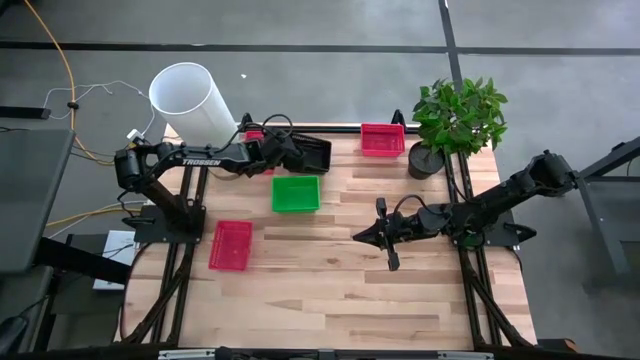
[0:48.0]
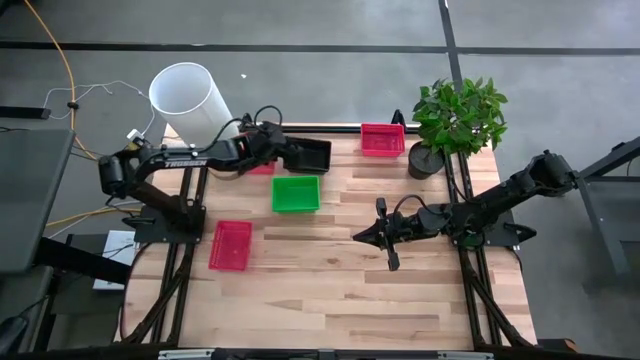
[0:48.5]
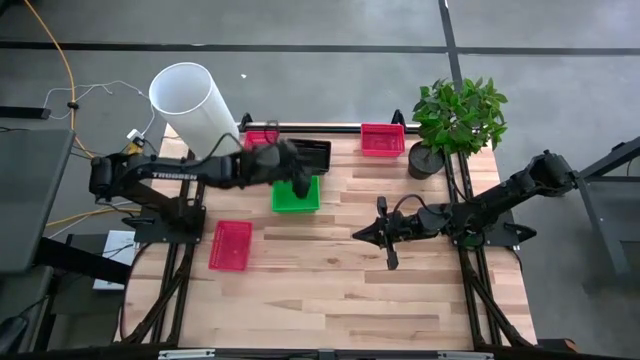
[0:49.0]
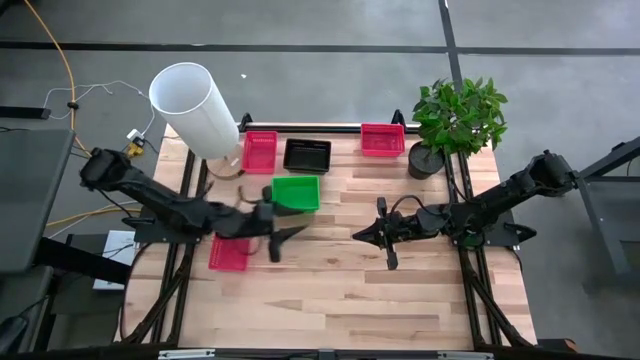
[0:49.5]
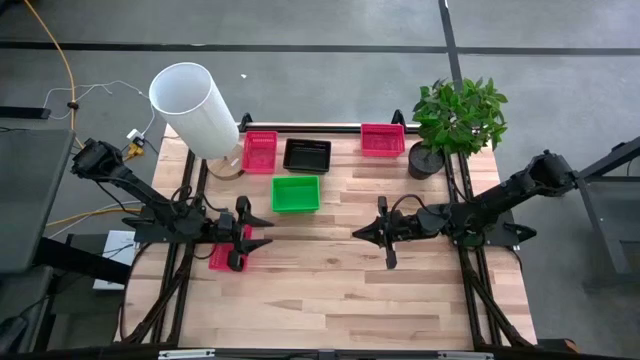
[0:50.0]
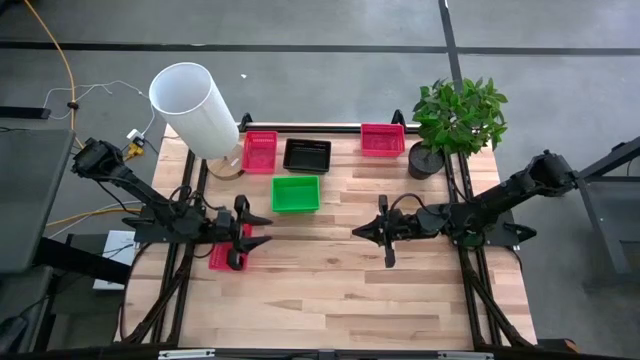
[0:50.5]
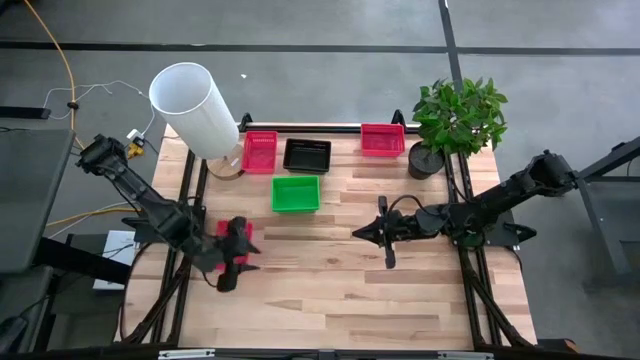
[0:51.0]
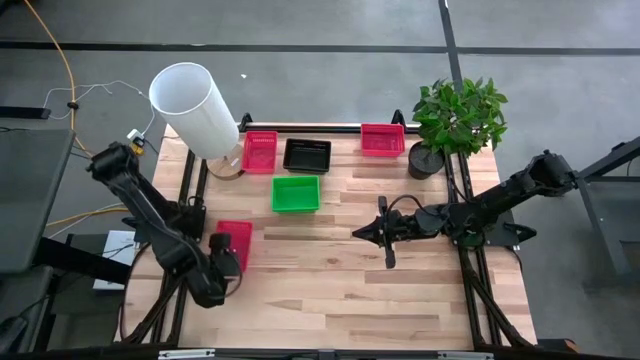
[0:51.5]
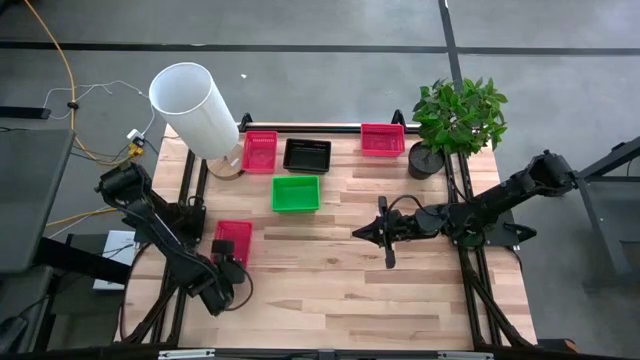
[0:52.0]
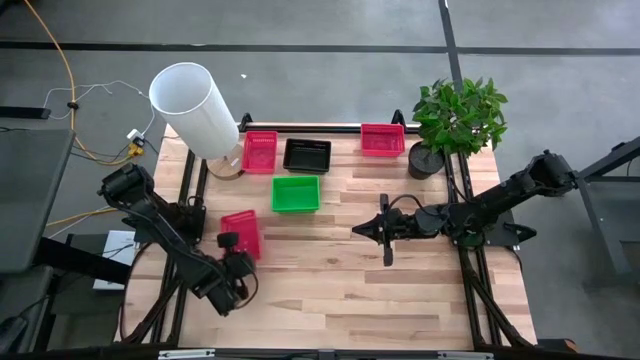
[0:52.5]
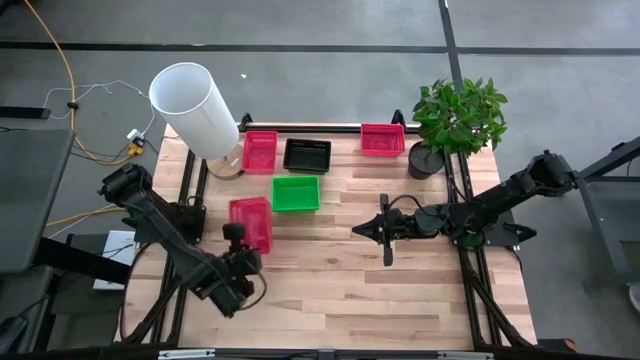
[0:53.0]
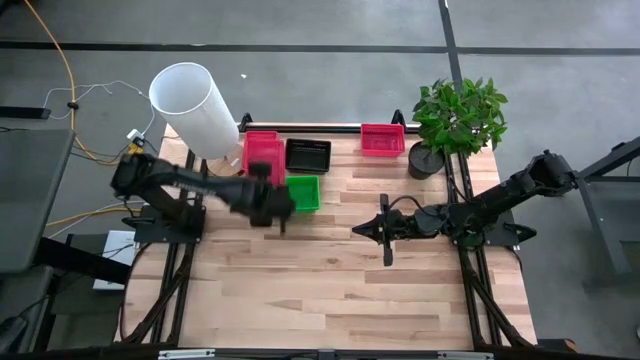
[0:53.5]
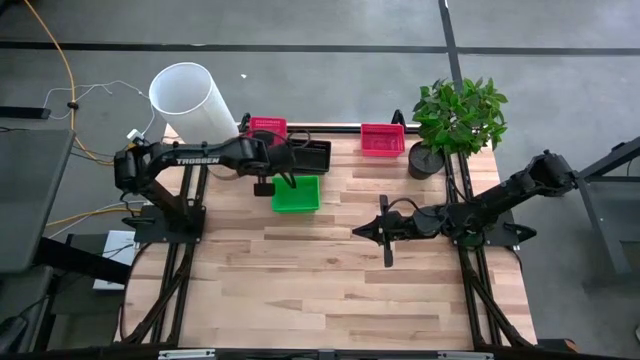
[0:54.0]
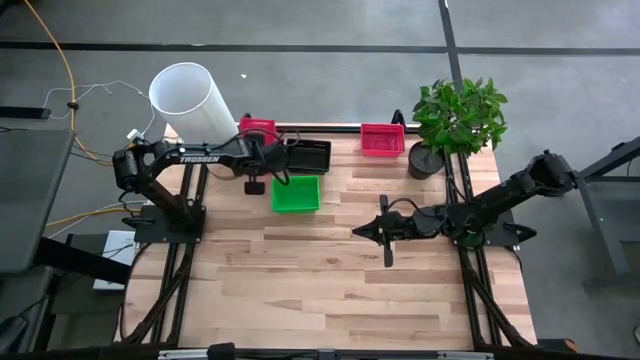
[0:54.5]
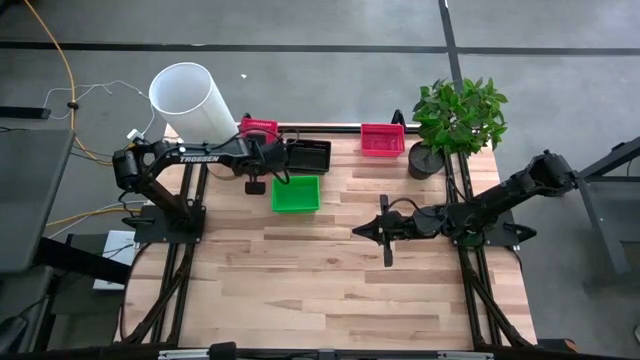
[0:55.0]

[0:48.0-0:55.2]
Stack the bottom red basket on top of the left top red basket

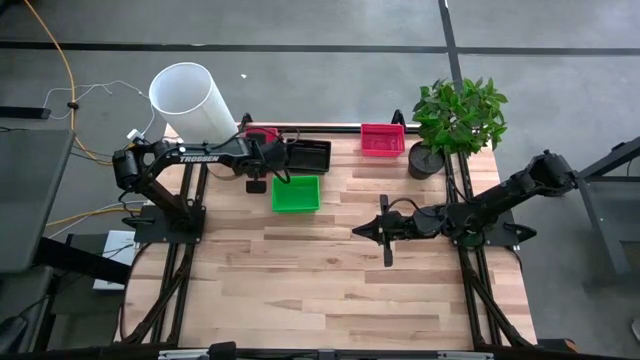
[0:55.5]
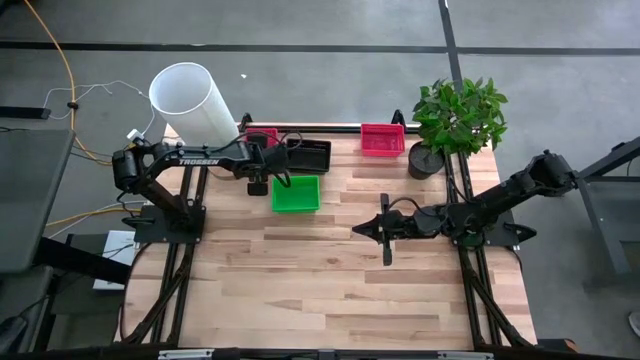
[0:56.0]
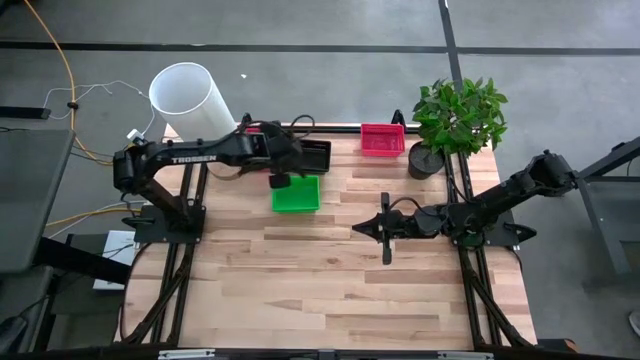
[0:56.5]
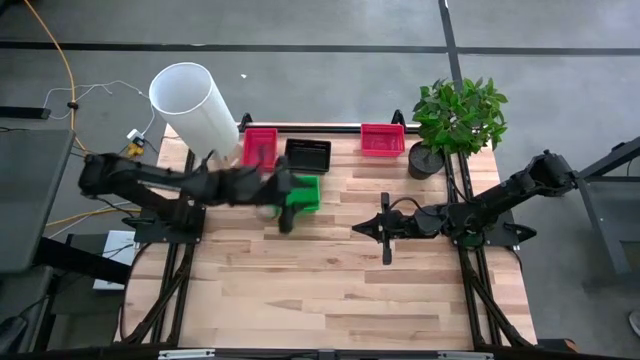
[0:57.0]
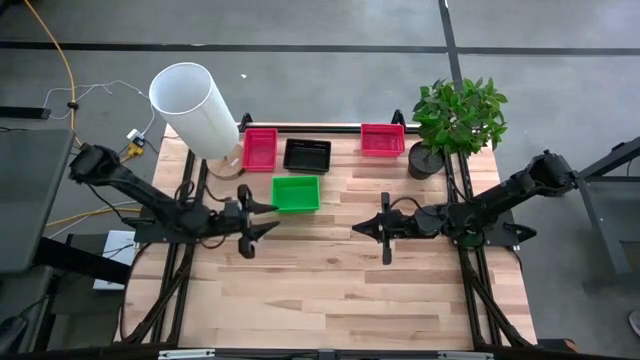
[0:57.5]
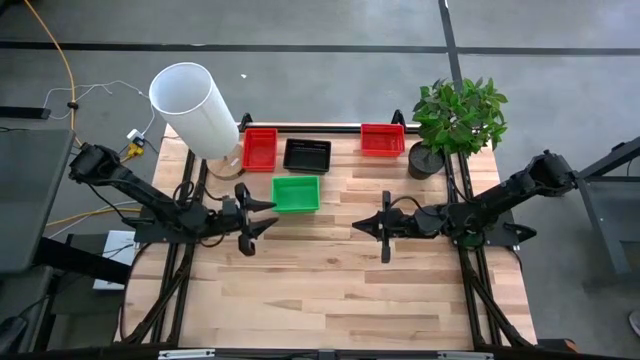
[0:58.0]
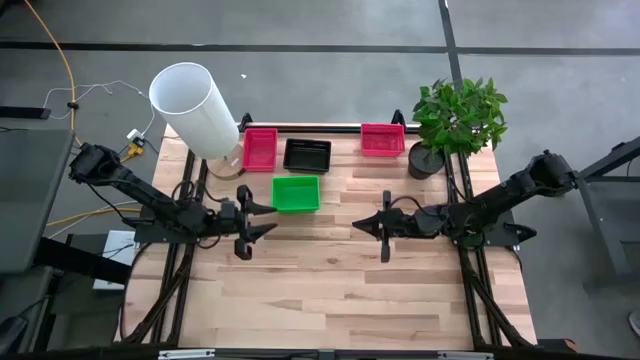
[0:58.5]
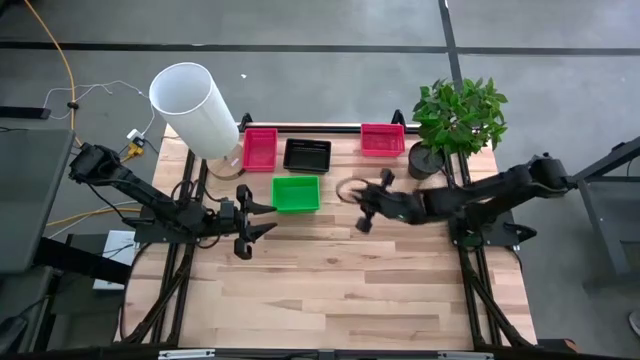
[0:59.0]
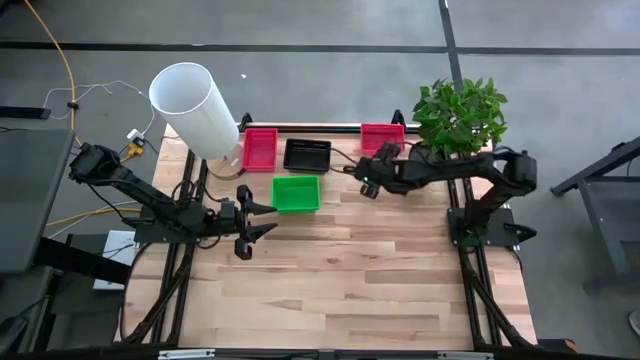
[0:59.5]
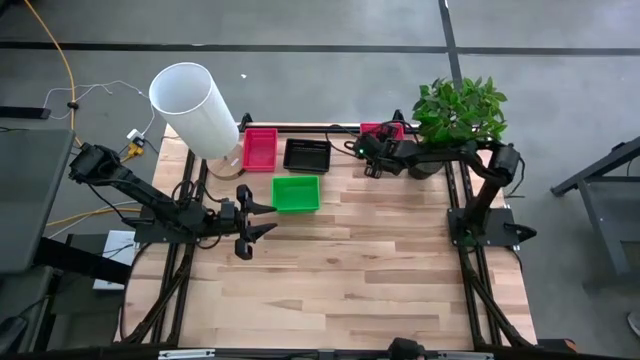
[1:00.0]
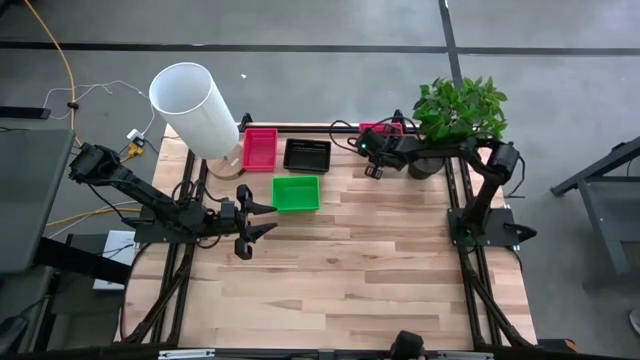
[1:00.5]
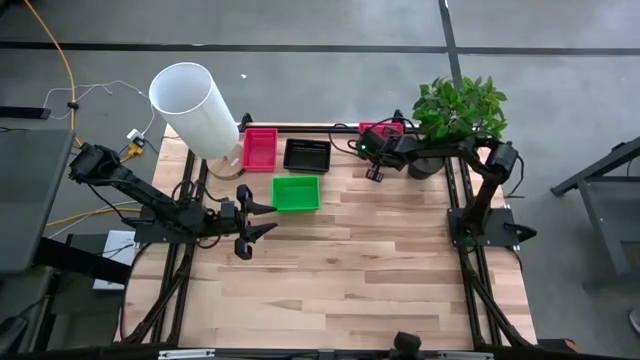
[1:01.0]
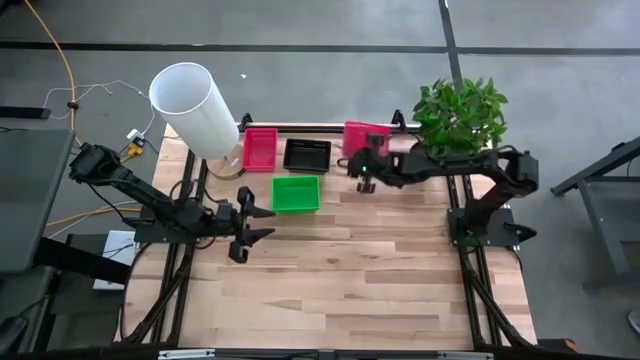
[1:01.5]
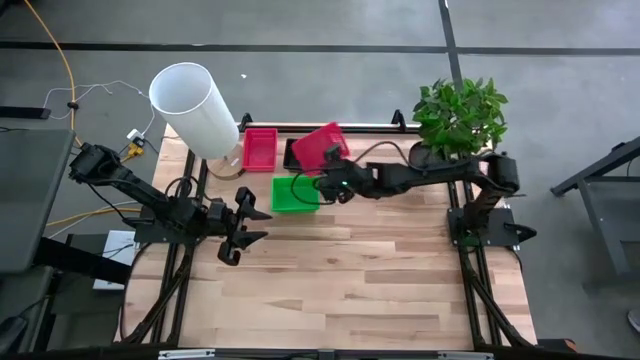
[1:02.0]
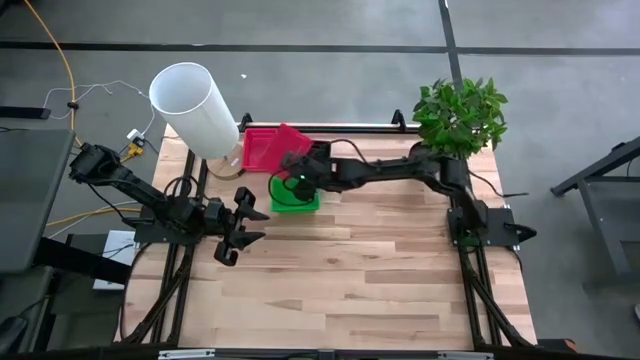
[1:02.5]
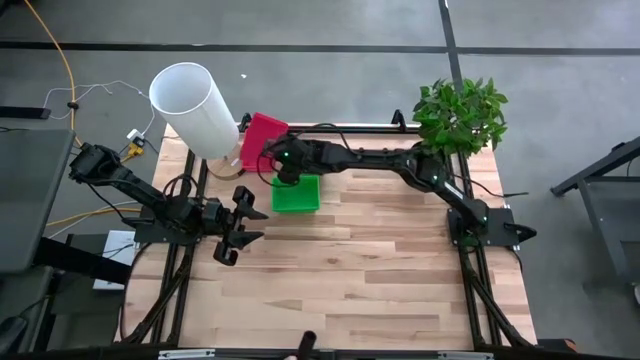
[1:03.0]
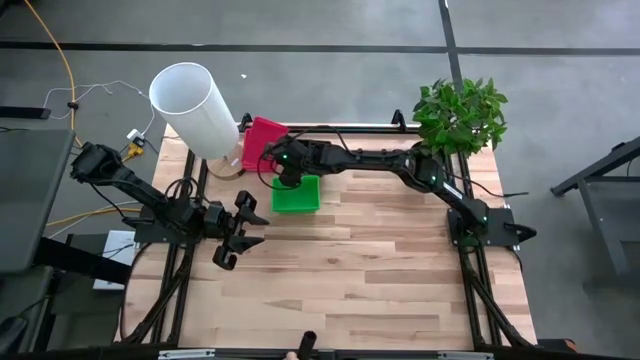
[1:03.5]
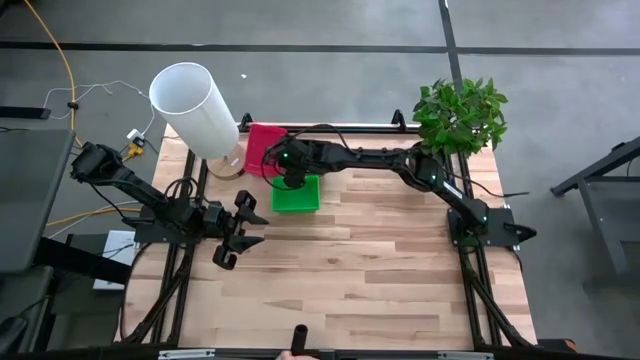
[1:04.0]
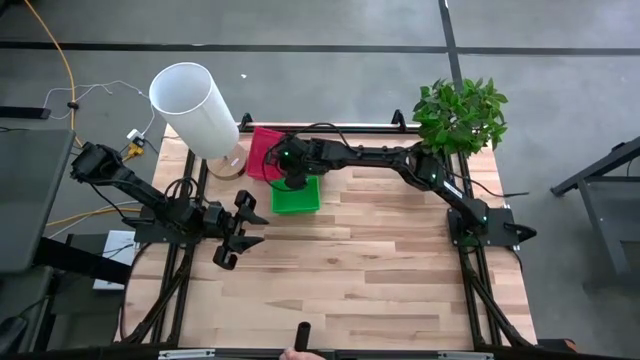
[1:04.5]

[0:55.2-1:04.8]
Stack the right red basket on top of the left red basket
